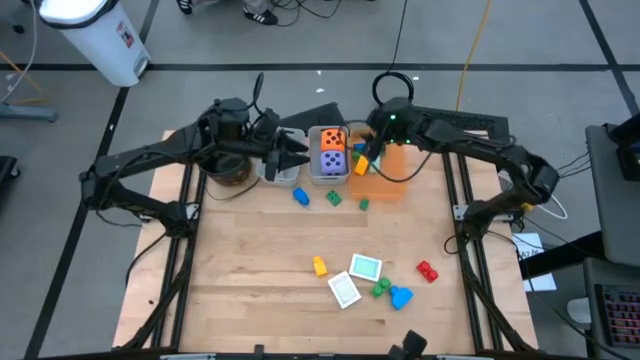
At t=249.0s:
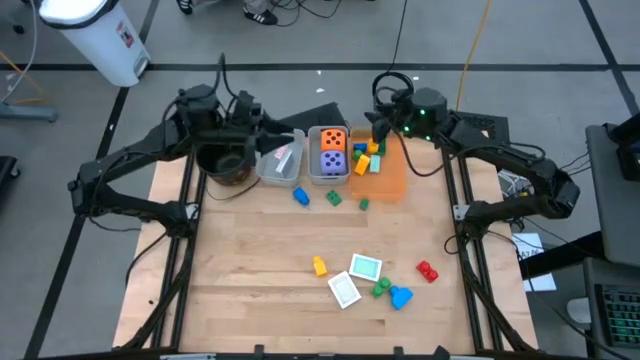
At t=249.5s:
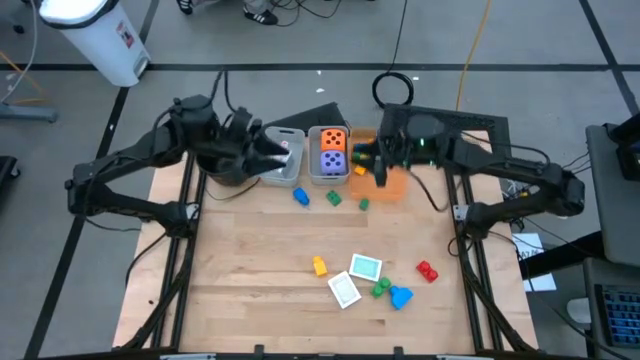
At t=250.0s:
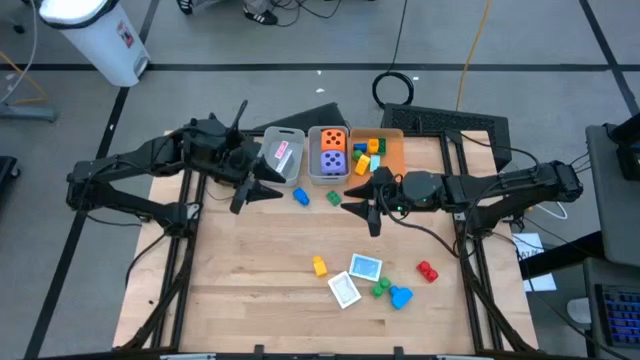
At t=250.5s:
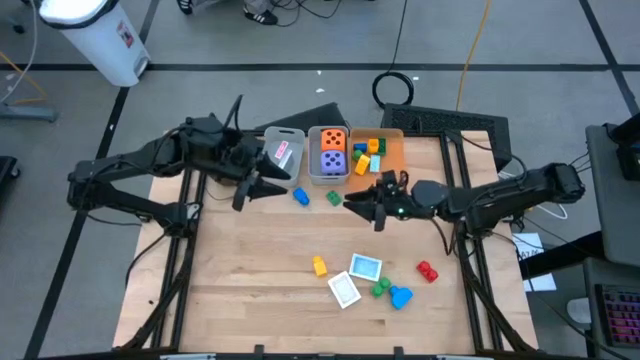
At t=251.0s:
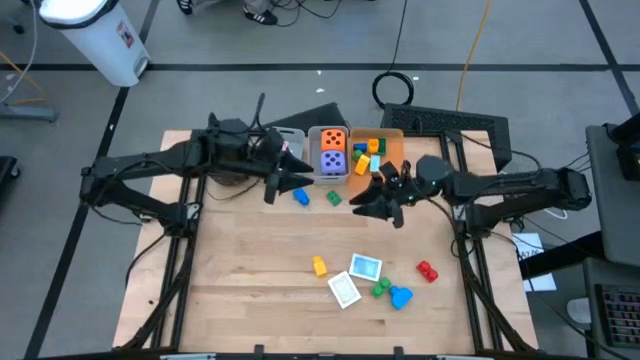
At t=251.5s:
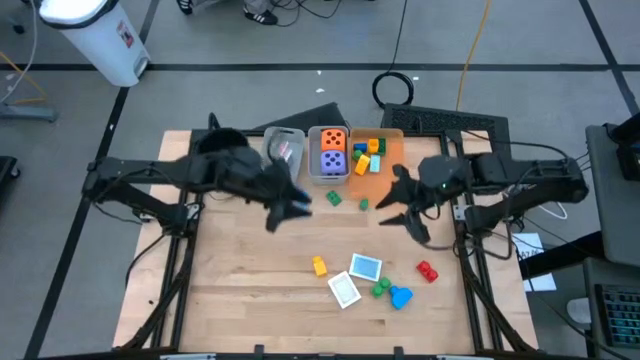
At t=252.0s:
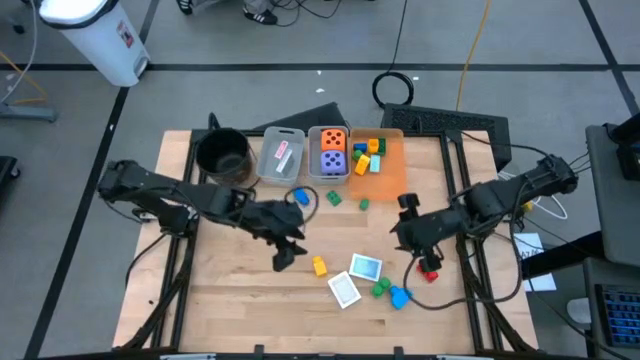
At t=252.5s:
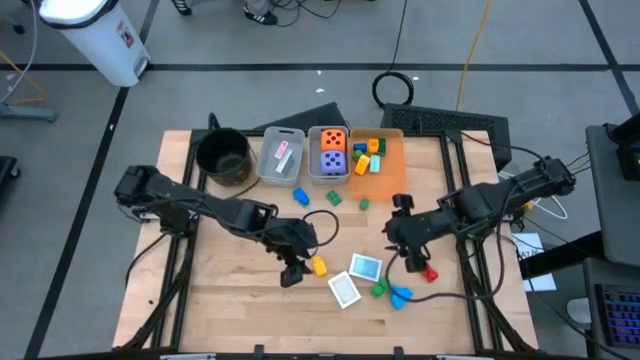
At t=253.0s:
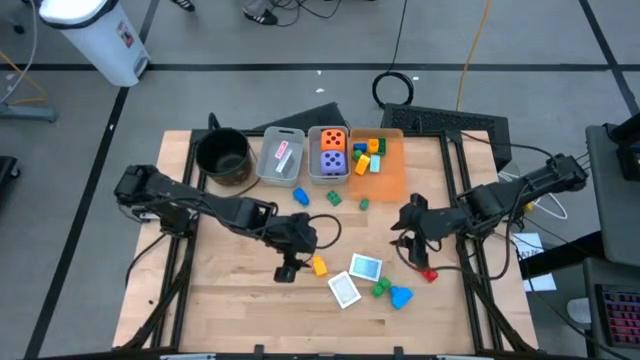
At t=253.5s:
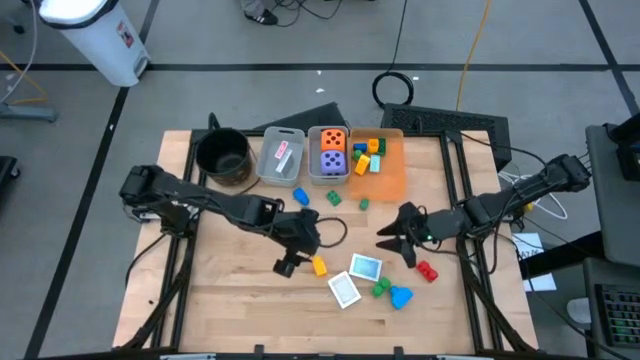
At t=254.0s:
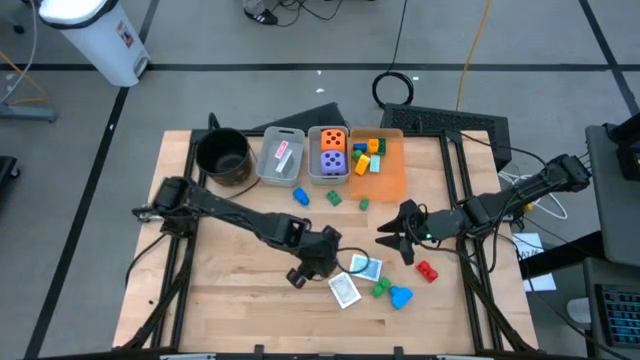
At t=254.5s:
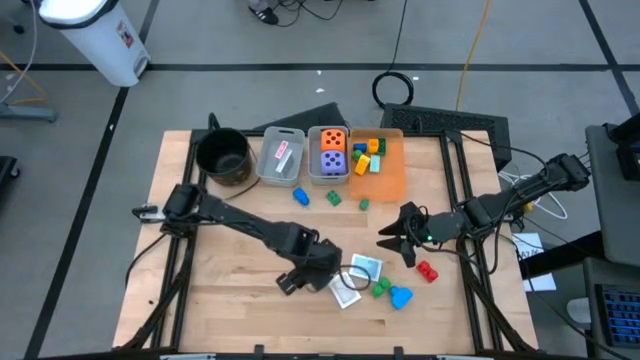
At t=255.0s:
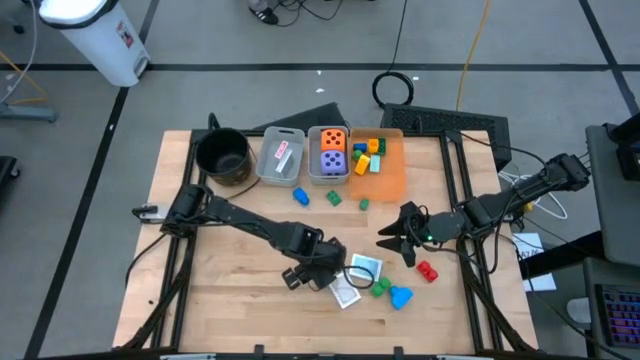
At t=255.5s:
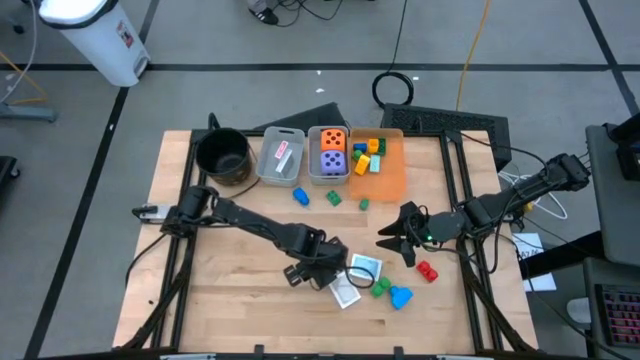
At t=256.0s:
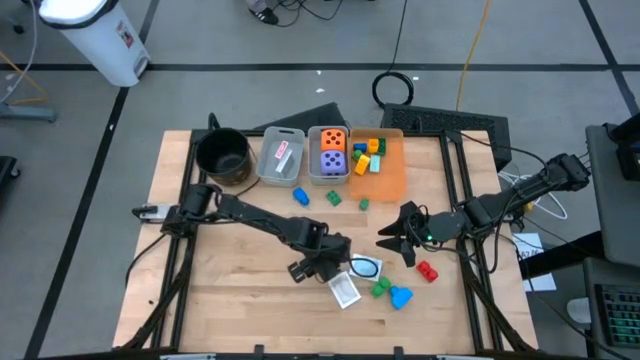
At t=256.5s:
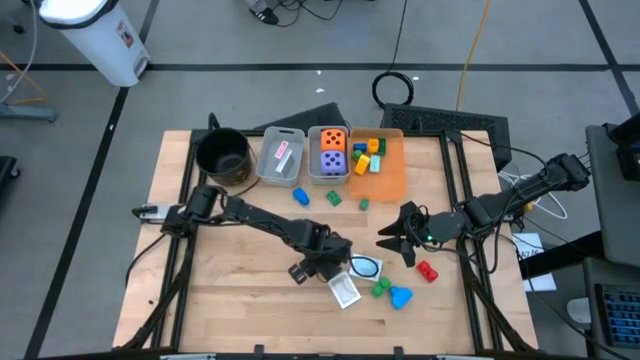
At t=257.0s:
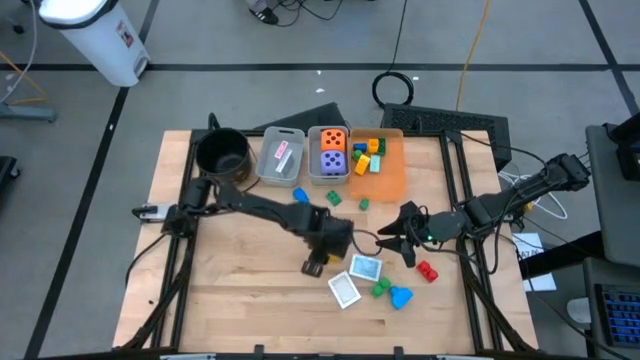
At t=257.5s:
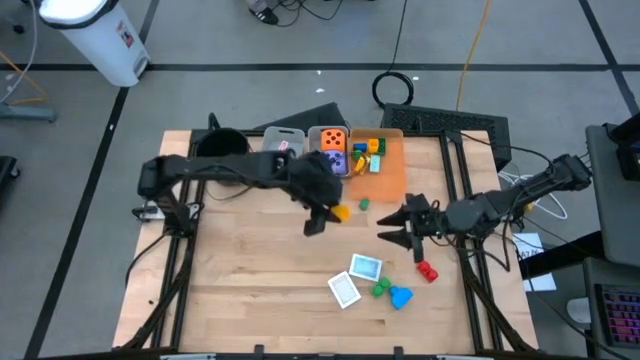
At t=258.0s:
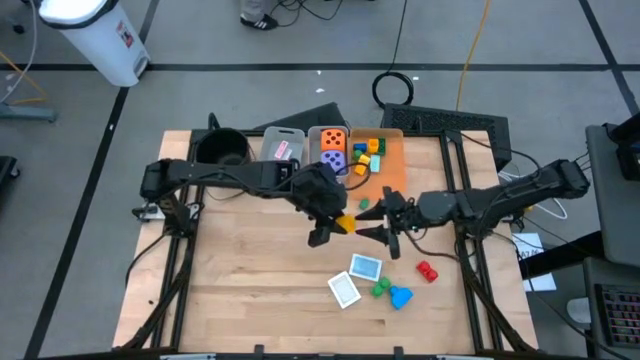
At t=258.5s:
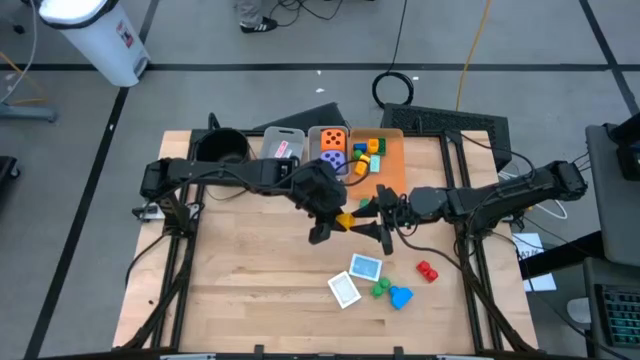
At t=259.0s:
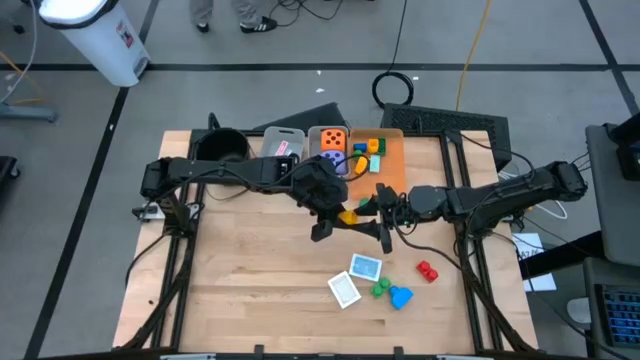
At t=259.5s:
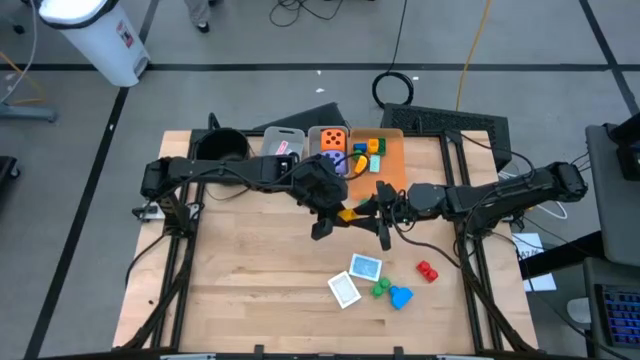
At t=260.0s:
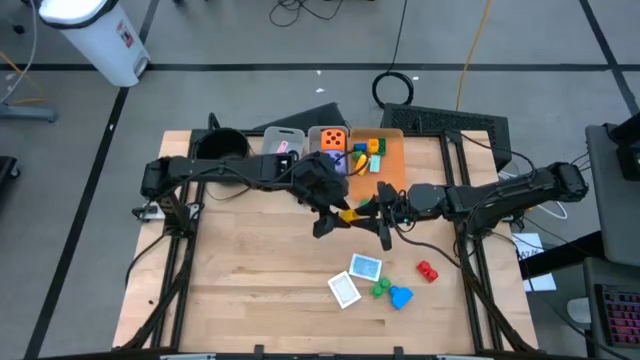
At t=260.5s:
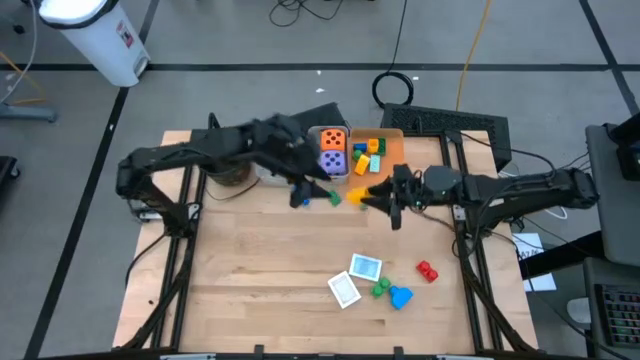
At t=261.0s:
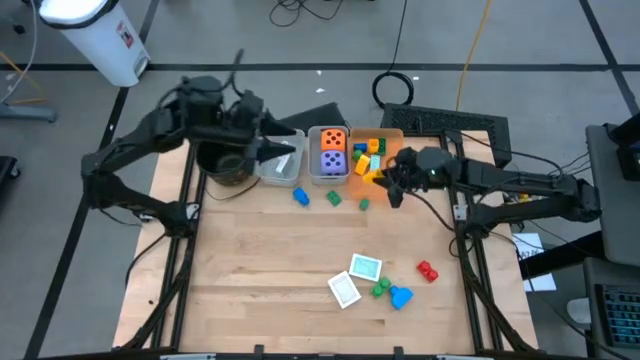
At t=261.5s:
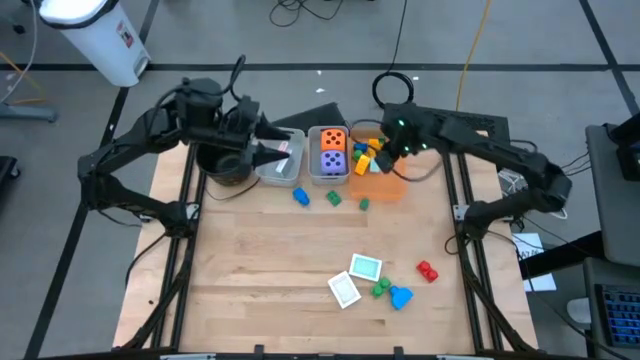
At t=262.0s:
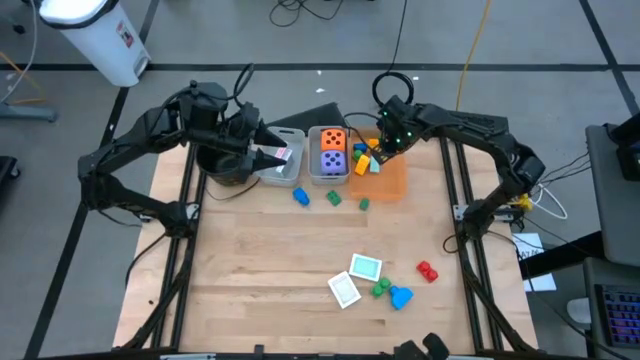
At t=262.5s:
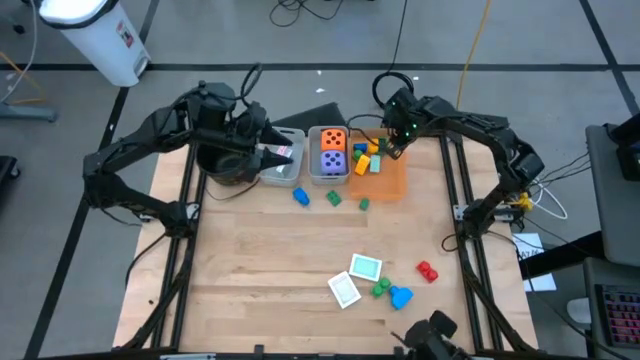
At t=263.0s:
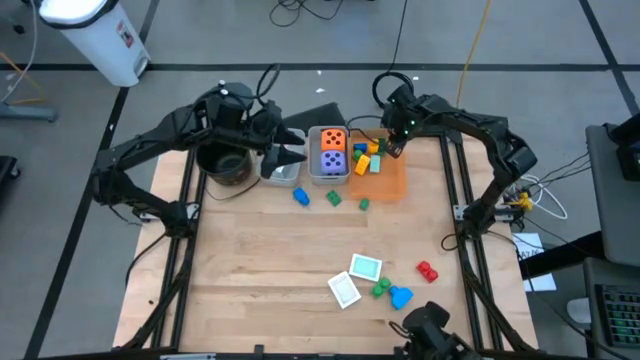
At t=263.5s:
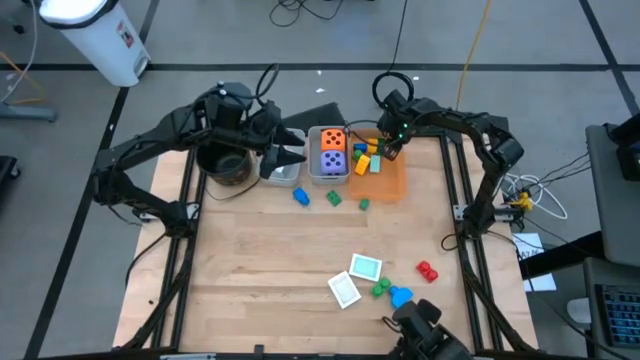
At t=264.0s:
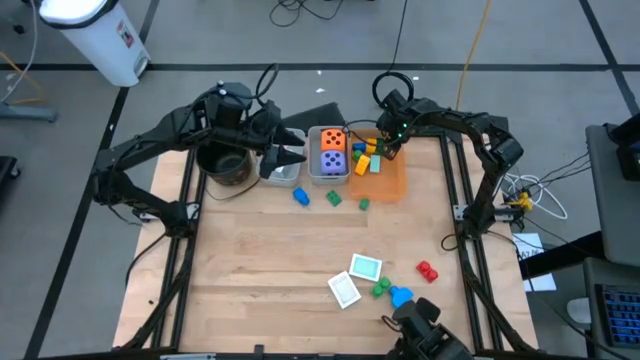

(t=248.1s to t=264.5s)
Task: Pick & Place Toys
Put the yellow game piece into the orange bin
